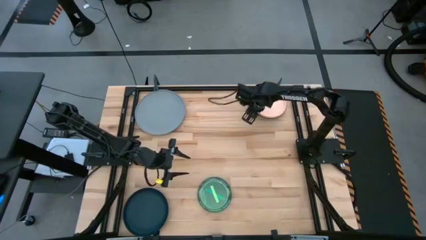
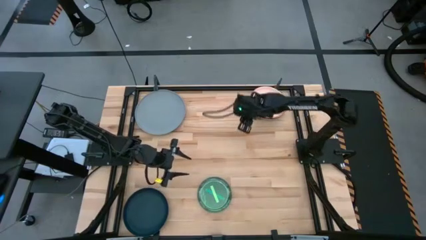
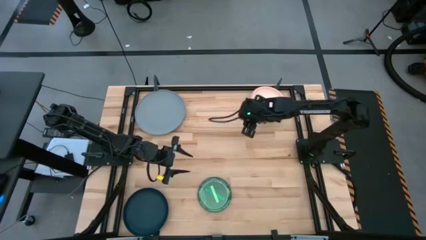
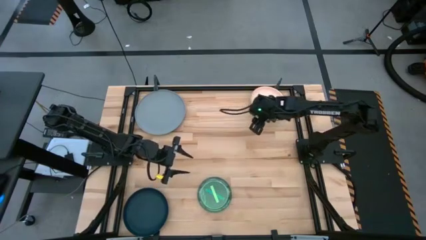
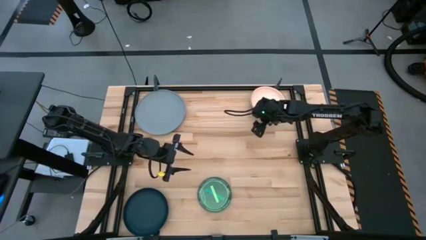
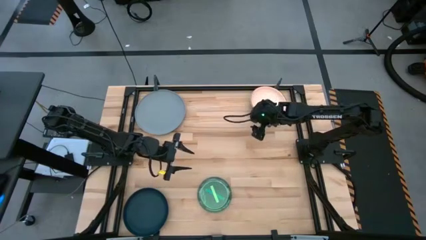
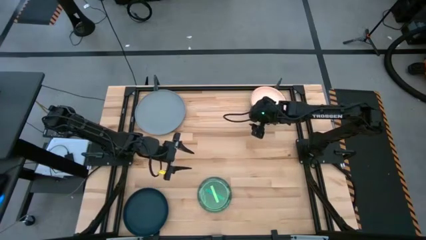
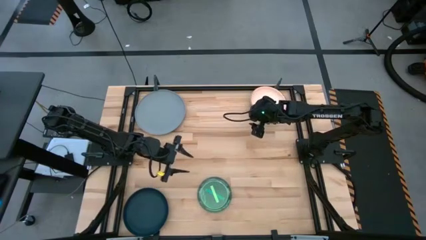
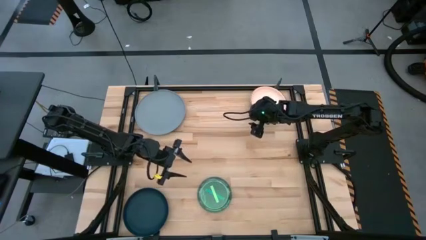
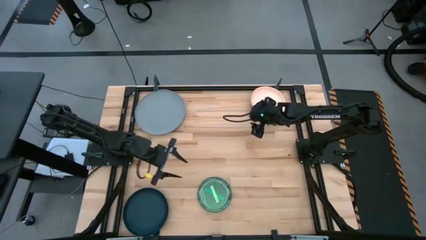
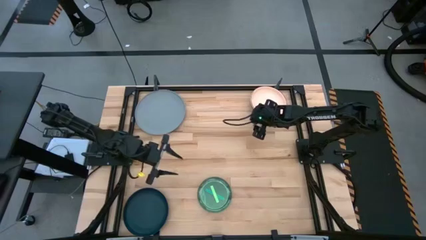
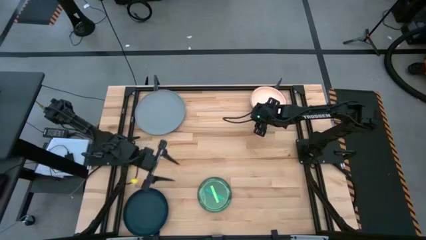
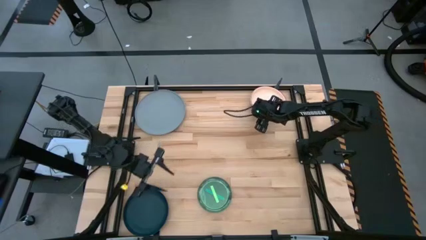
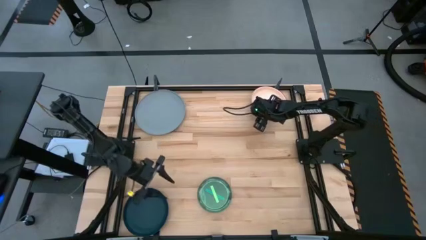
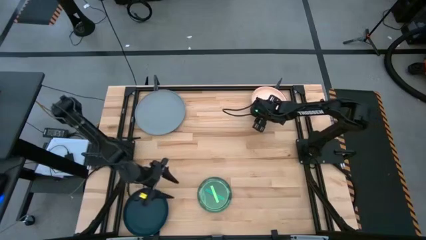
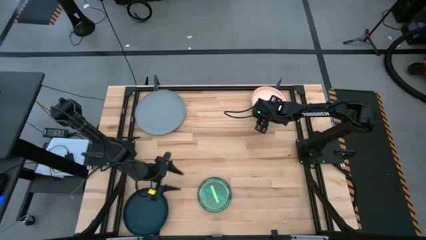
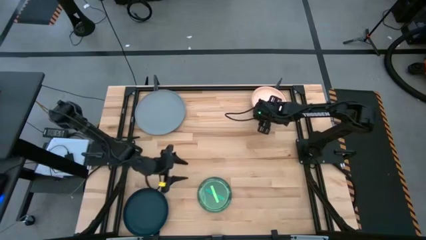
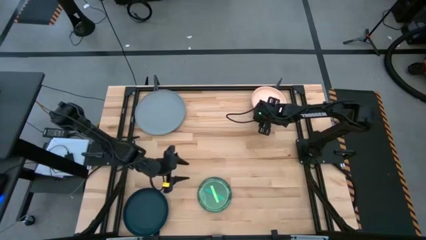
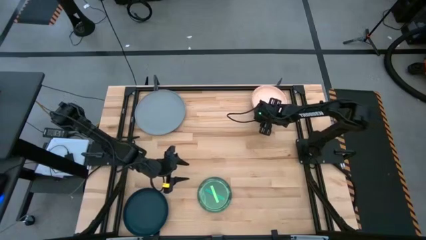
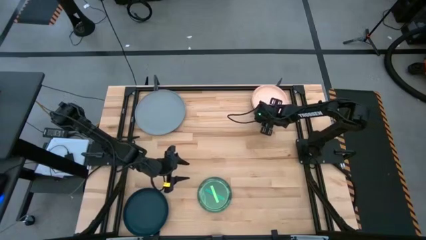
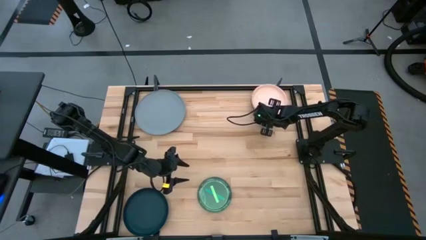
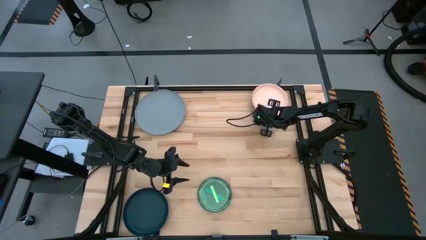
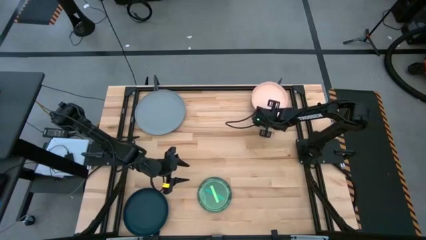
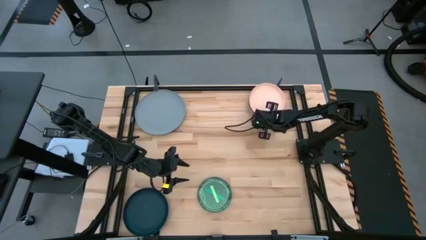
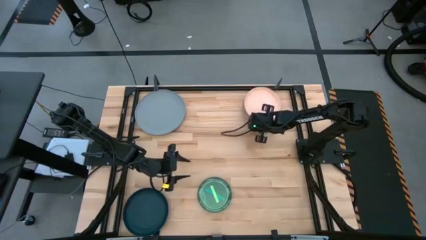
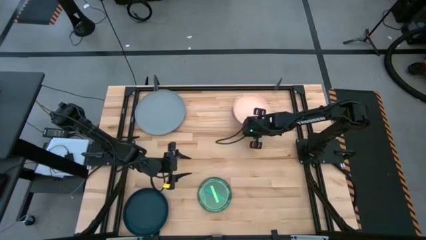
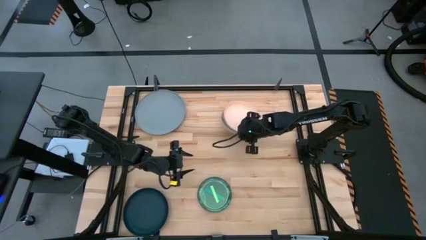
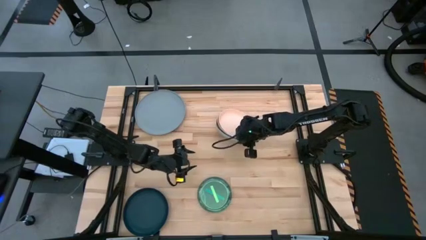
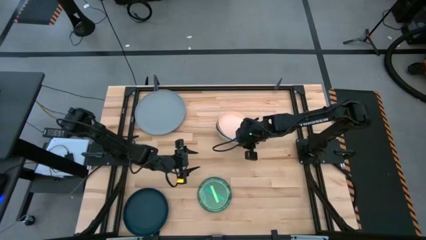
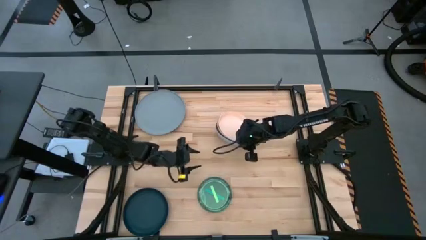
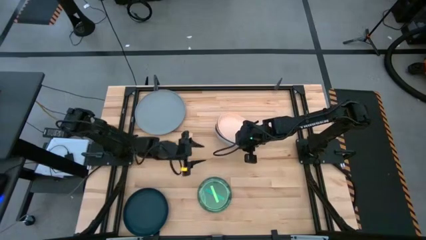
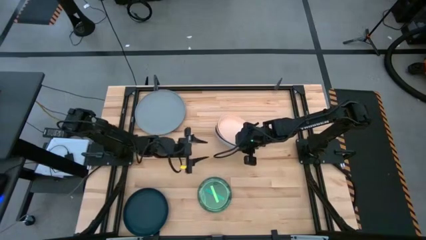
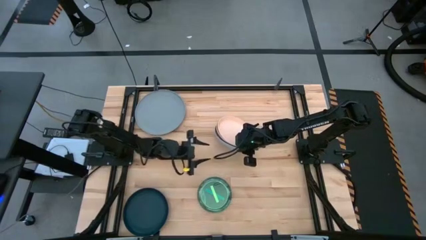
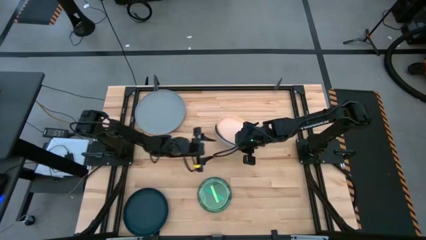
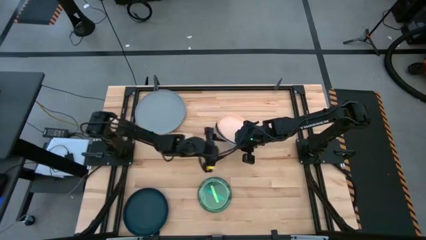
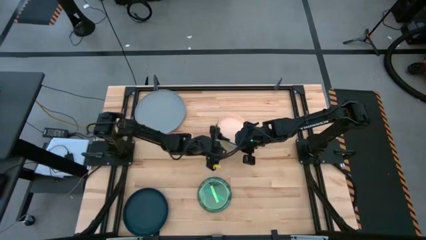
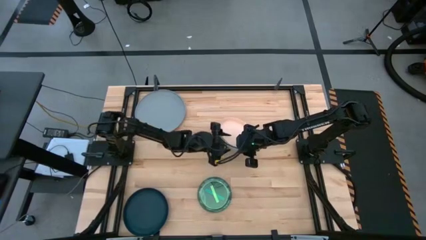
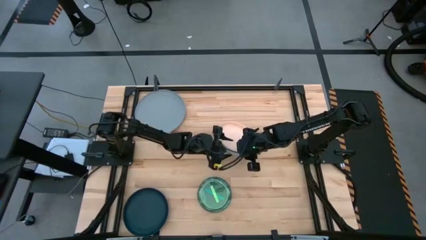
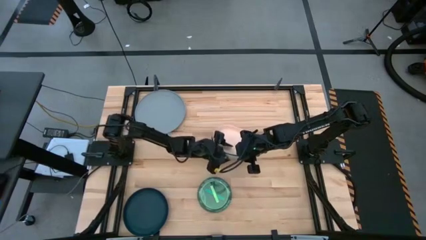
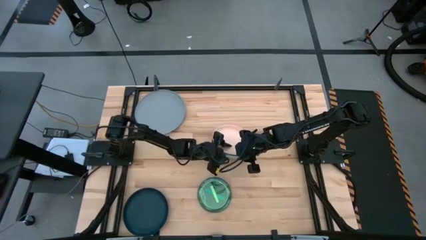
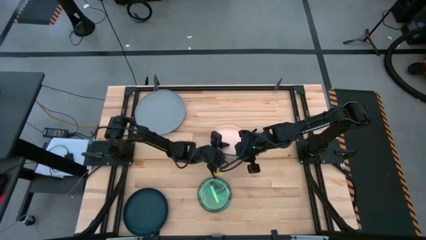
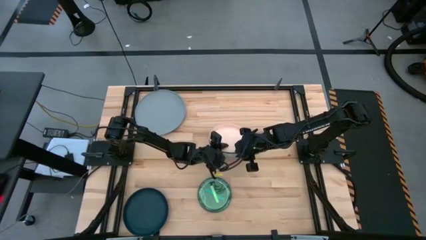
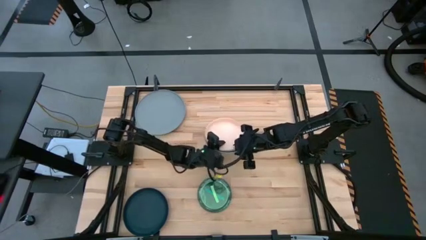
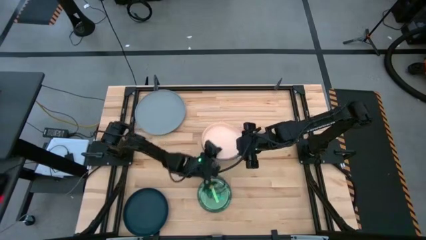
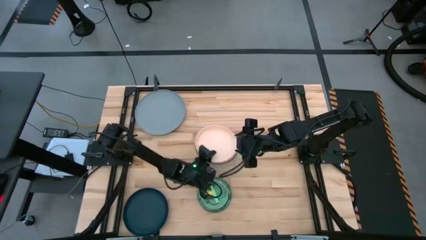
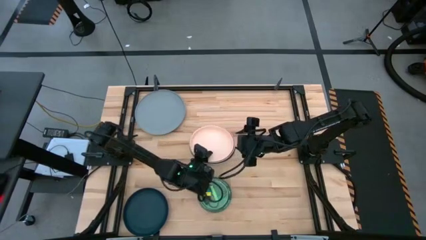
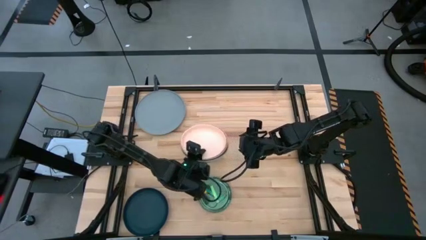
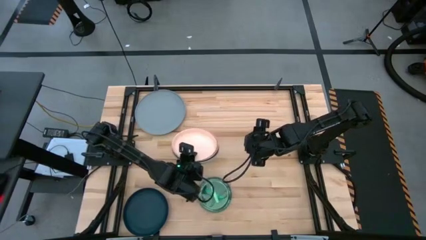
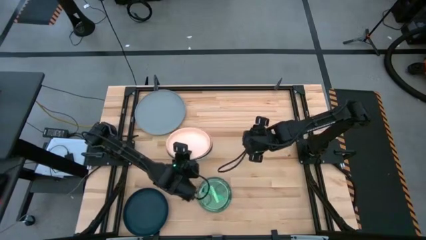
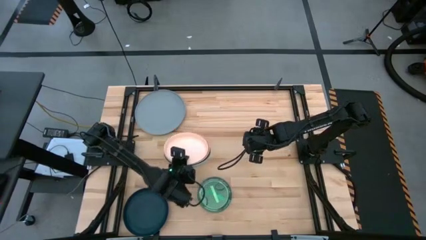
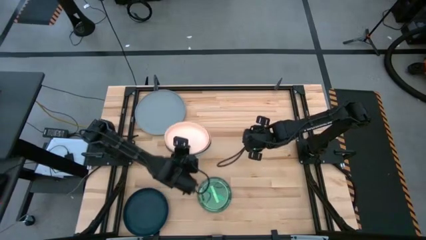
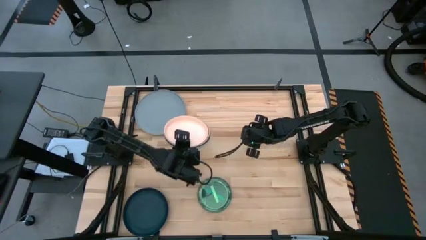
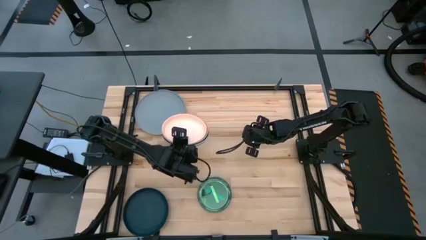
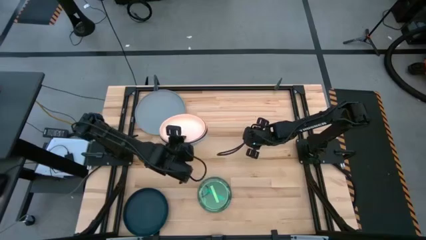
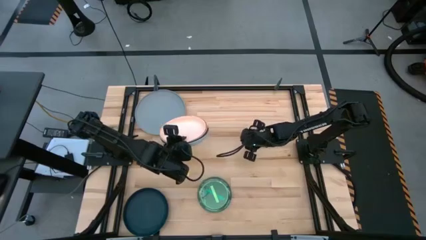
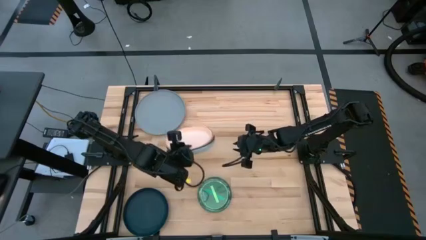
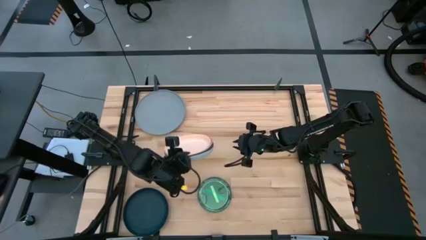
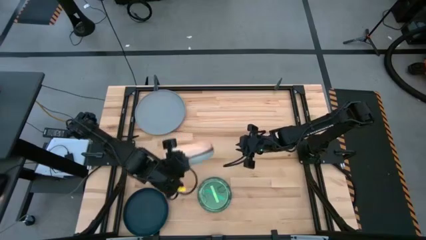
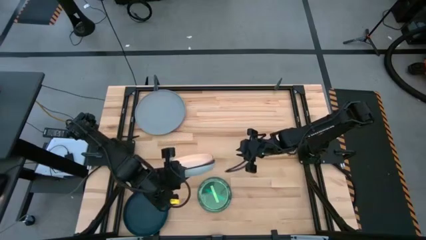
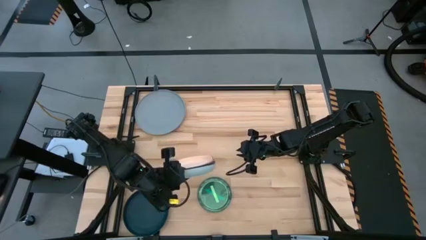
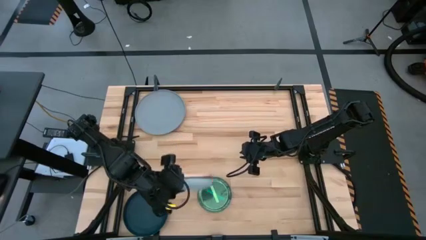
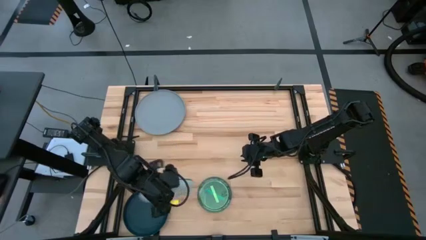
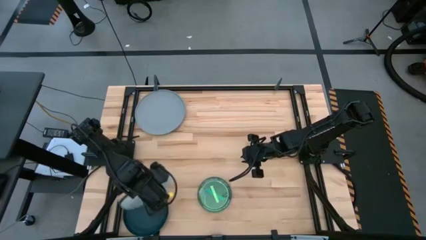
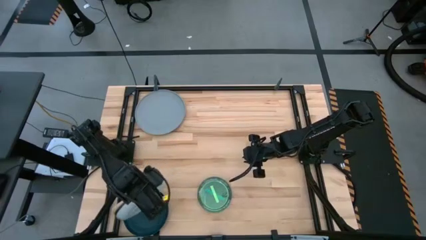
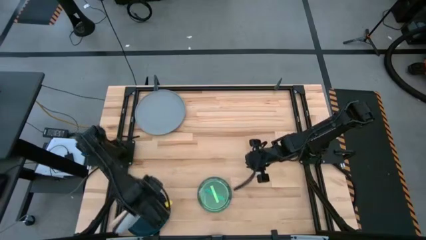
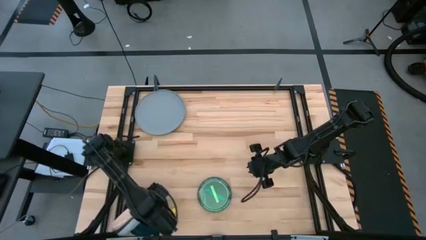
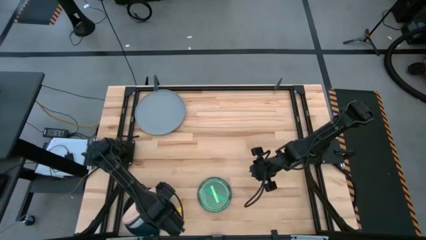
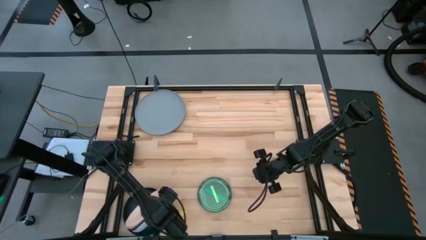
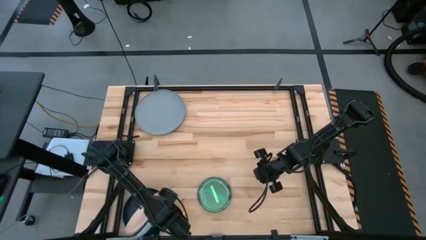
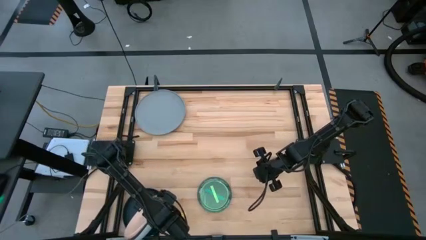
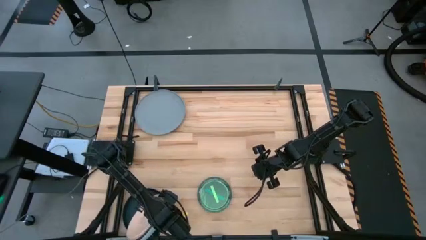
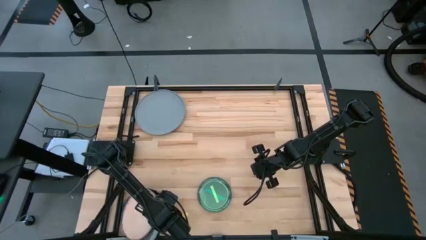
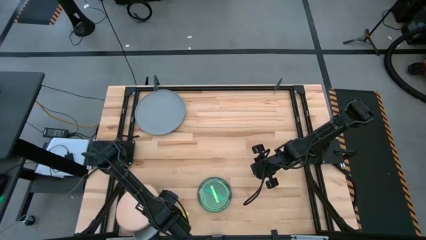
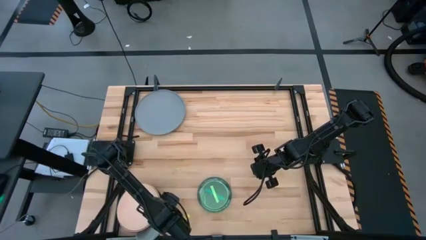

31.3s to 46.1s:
Task: Stack plastic plates
Stack the plates on the black plate

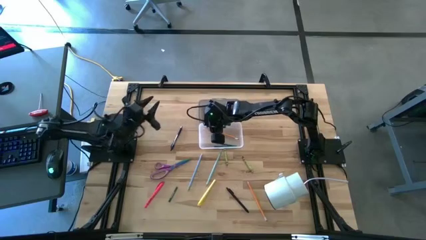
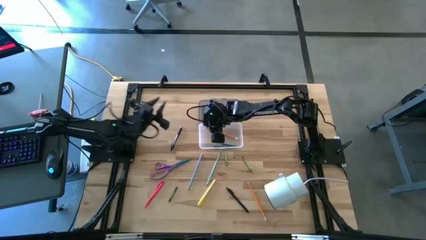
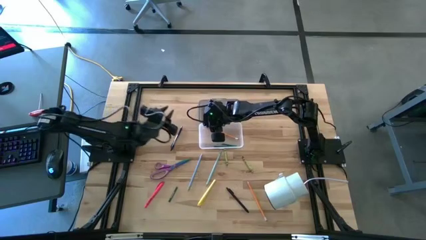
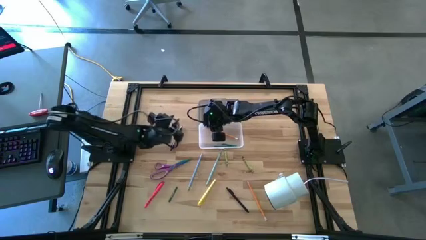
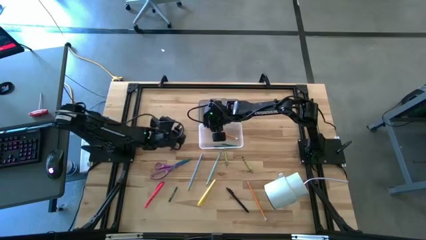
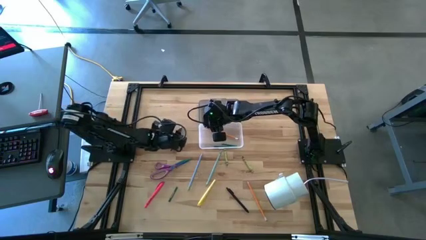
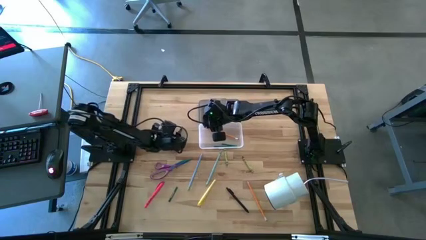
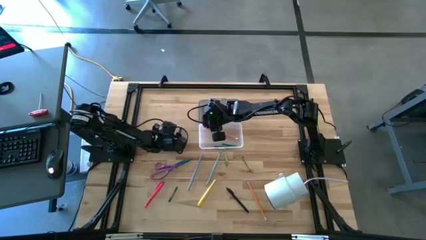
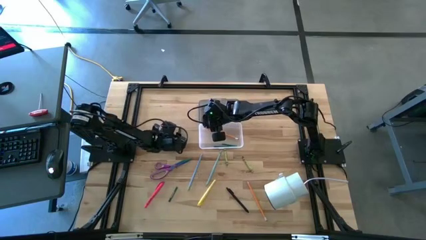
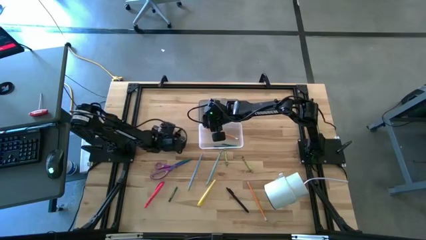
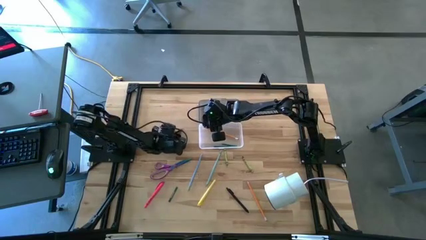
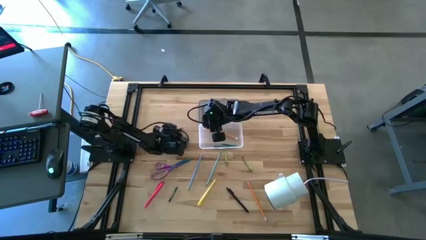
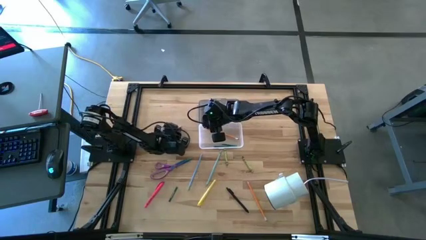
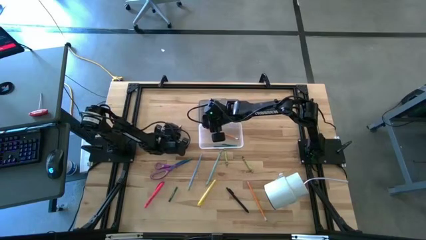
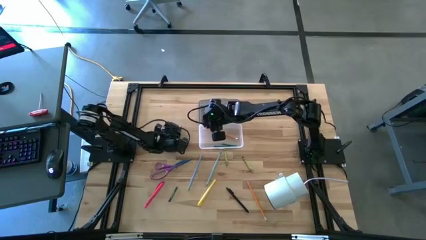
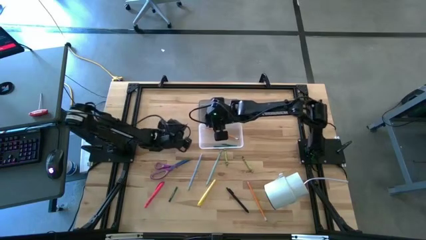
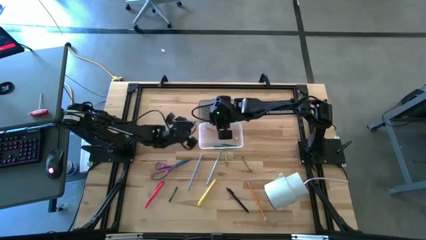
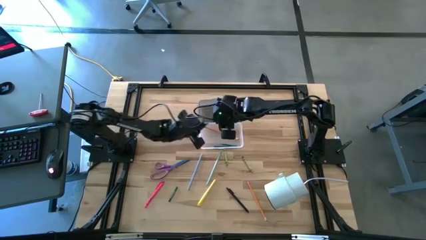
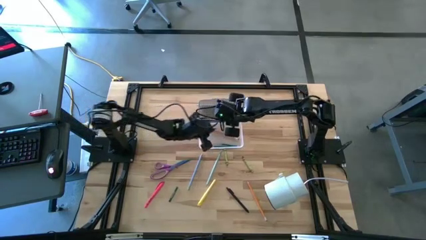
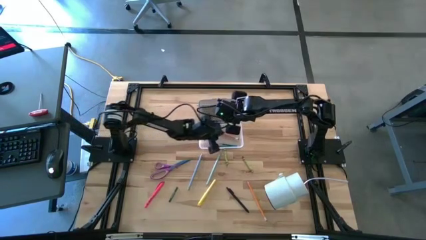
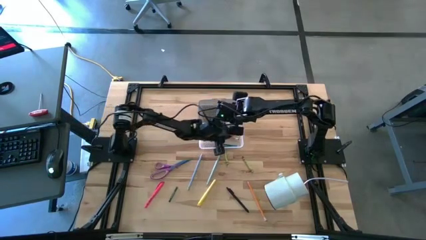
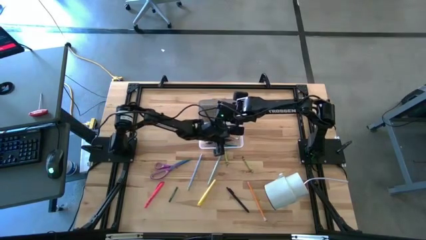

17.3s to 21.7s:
Task: Pick & place school supplies into a supply box
Put the top black pen into the black supply box
